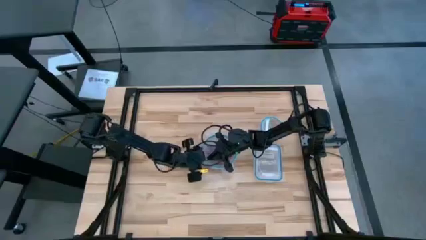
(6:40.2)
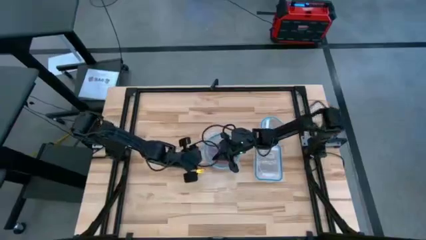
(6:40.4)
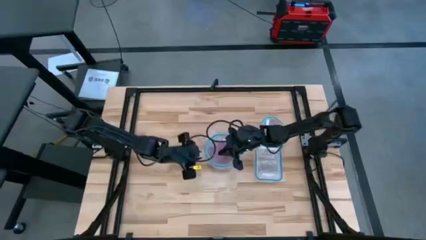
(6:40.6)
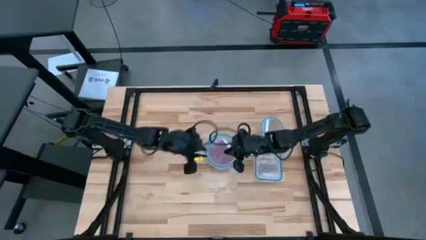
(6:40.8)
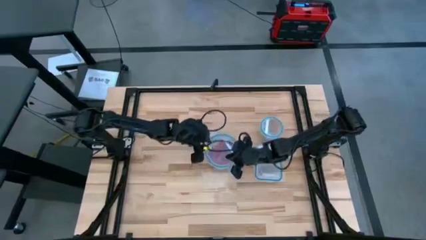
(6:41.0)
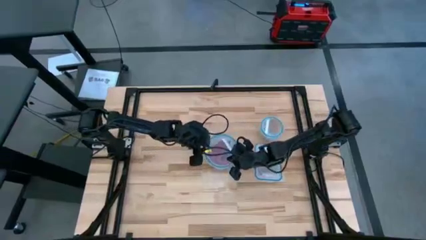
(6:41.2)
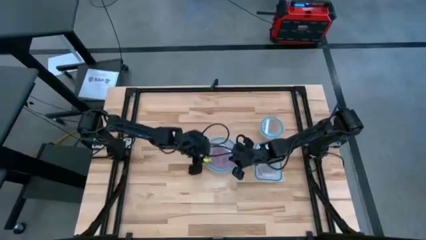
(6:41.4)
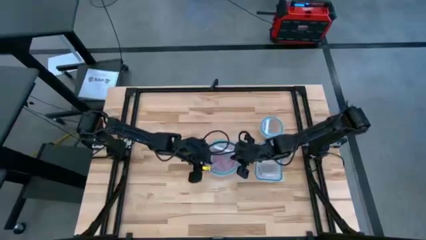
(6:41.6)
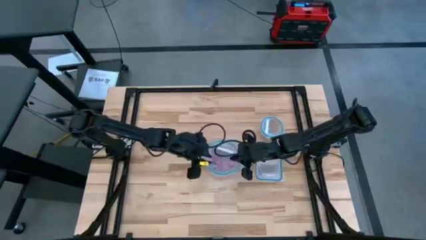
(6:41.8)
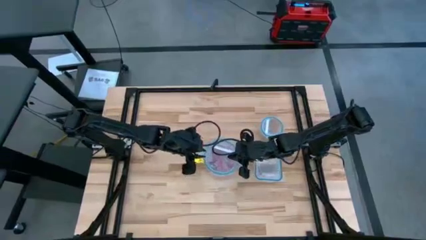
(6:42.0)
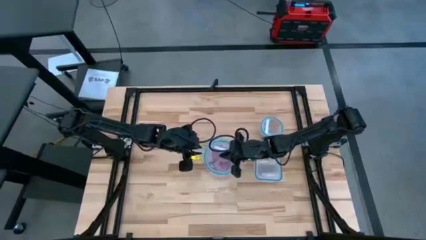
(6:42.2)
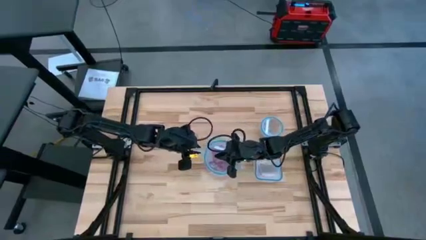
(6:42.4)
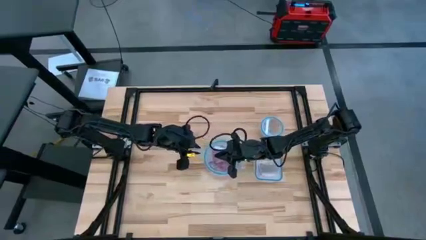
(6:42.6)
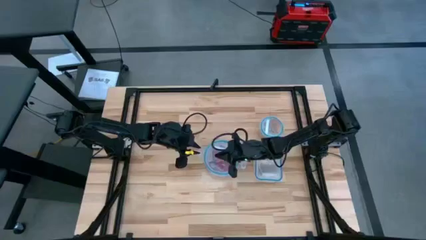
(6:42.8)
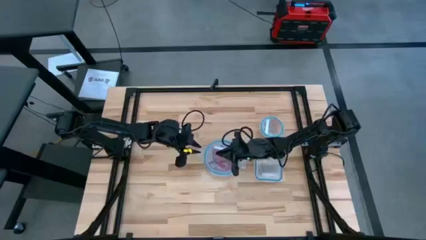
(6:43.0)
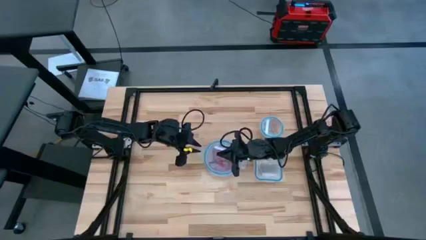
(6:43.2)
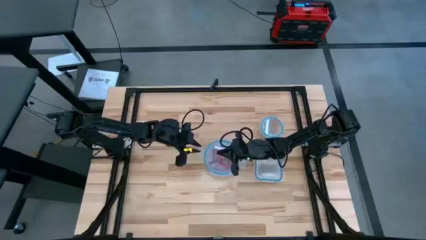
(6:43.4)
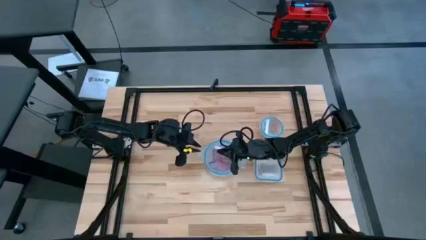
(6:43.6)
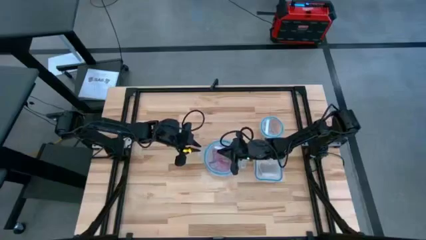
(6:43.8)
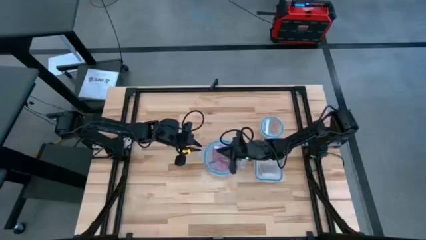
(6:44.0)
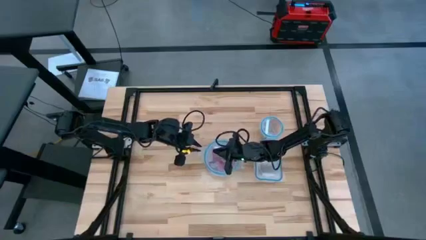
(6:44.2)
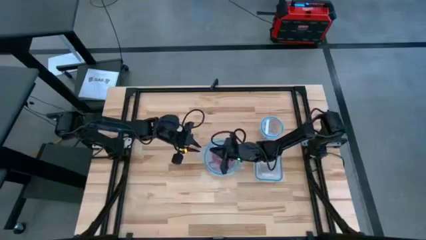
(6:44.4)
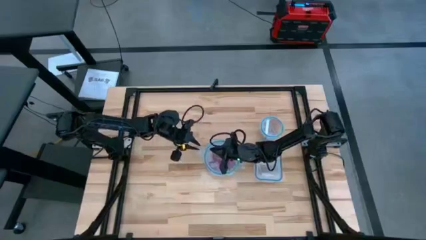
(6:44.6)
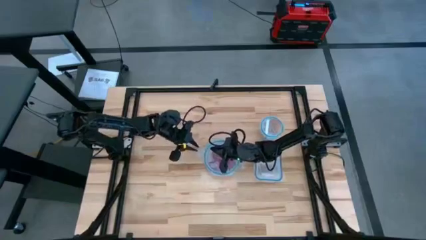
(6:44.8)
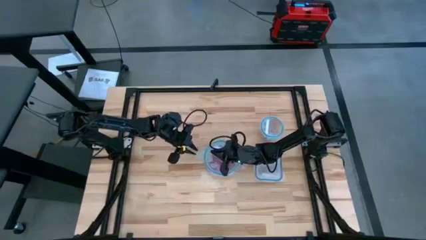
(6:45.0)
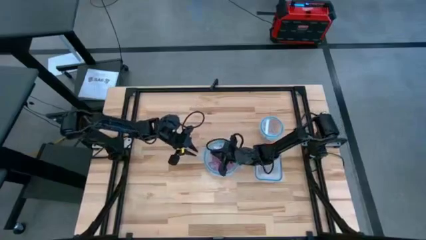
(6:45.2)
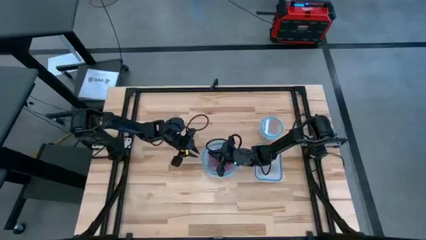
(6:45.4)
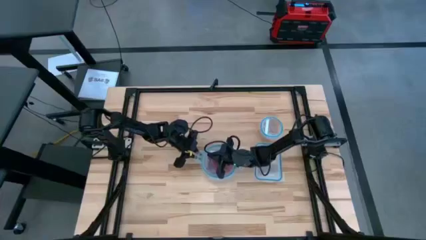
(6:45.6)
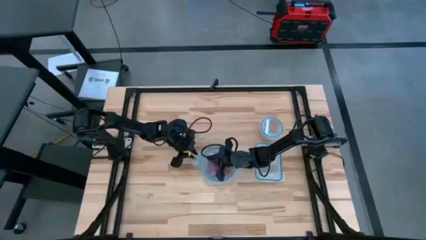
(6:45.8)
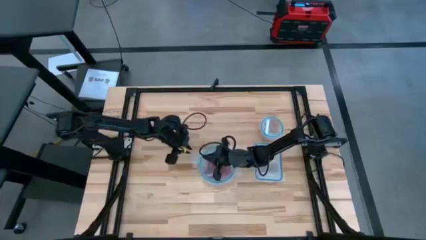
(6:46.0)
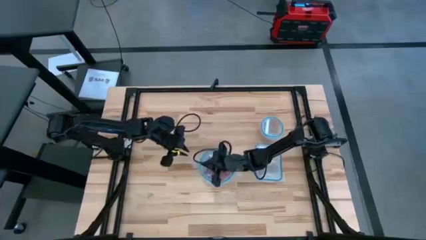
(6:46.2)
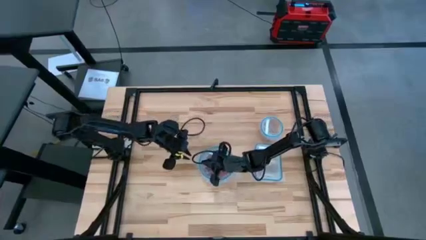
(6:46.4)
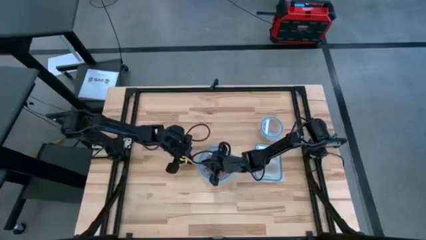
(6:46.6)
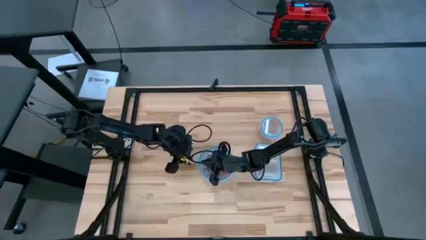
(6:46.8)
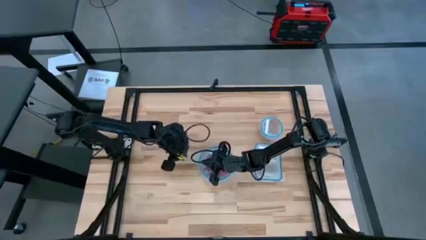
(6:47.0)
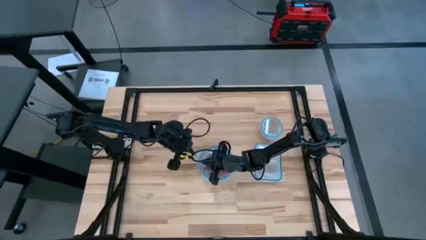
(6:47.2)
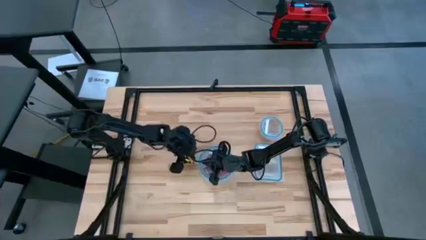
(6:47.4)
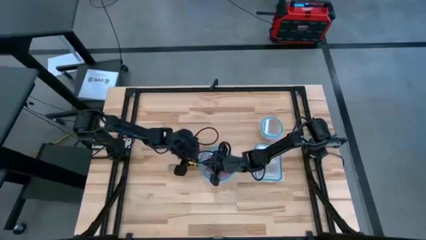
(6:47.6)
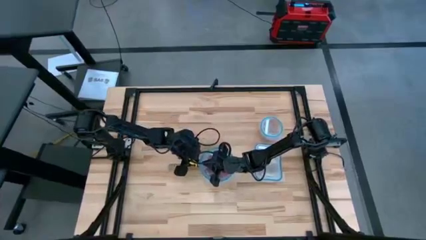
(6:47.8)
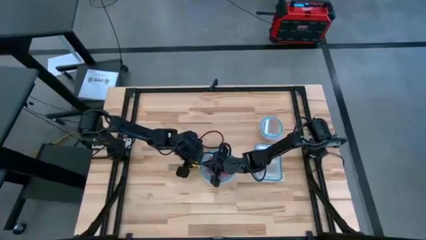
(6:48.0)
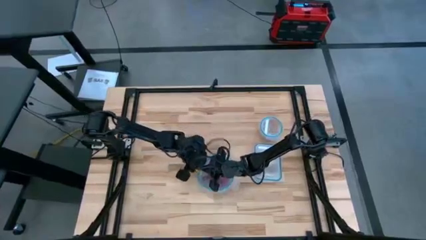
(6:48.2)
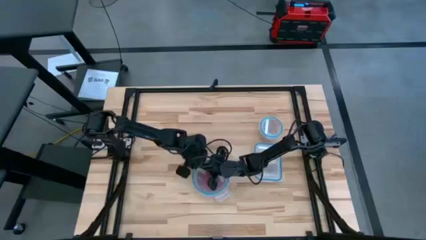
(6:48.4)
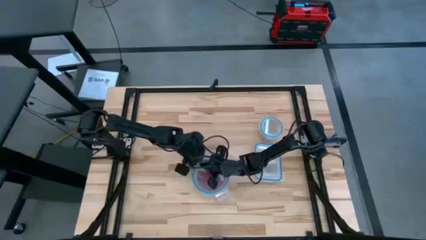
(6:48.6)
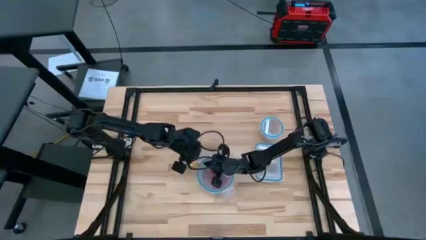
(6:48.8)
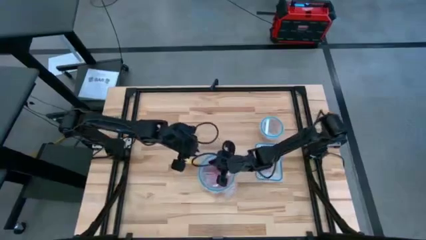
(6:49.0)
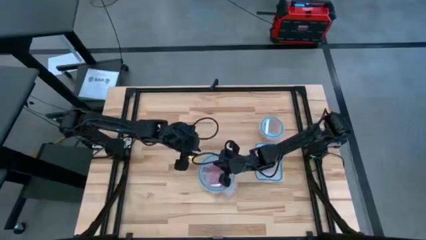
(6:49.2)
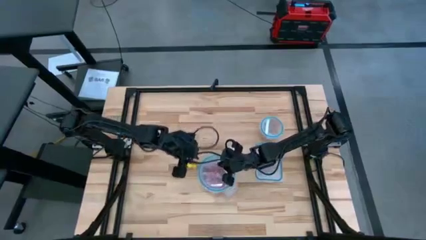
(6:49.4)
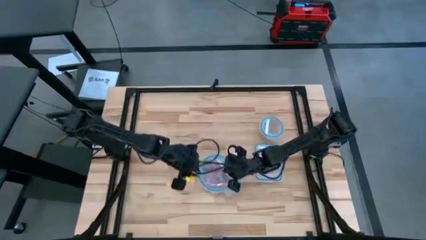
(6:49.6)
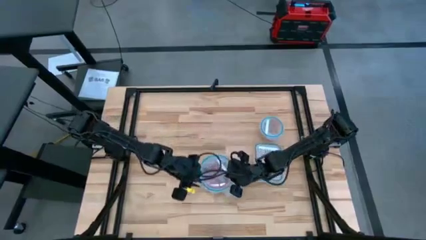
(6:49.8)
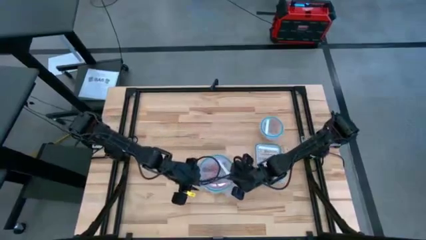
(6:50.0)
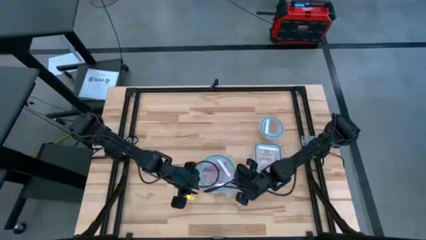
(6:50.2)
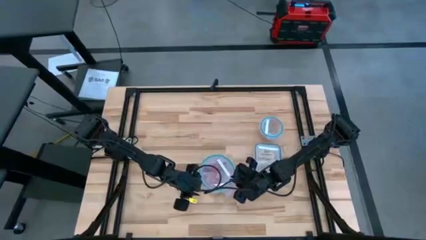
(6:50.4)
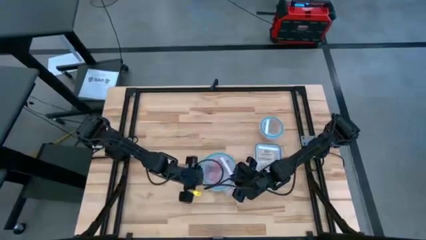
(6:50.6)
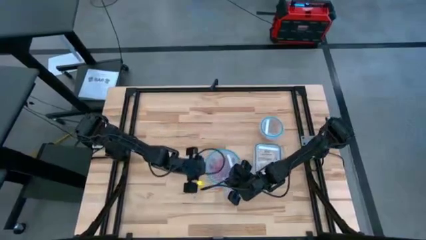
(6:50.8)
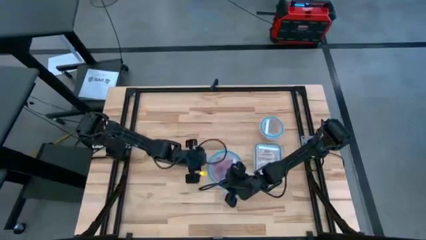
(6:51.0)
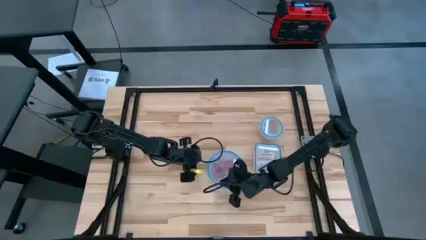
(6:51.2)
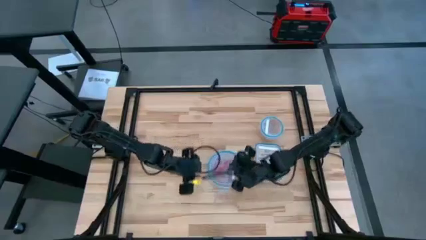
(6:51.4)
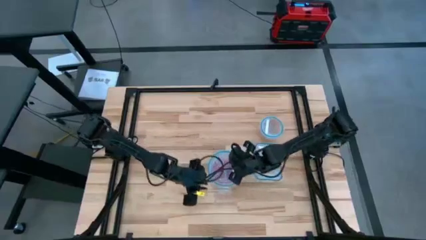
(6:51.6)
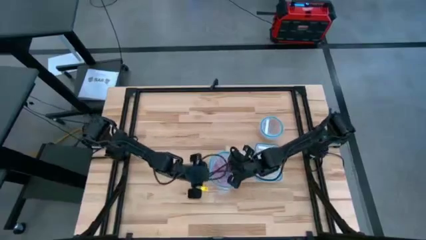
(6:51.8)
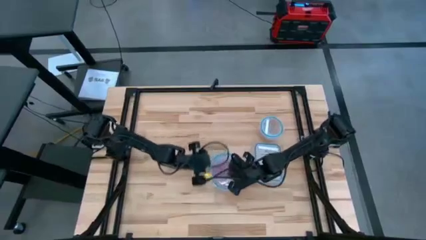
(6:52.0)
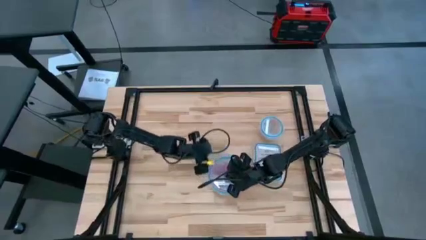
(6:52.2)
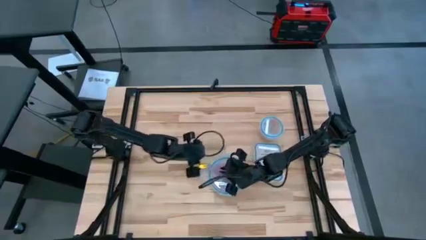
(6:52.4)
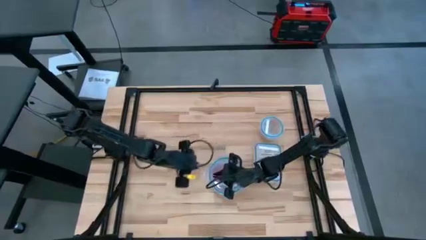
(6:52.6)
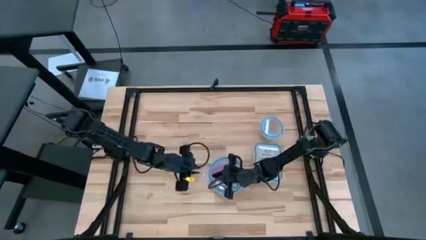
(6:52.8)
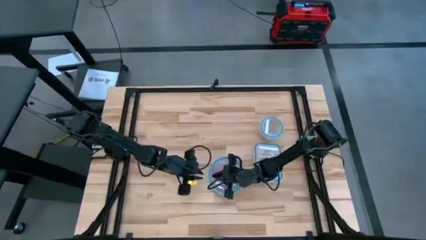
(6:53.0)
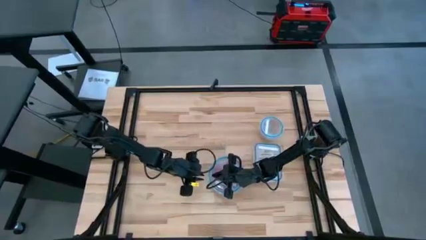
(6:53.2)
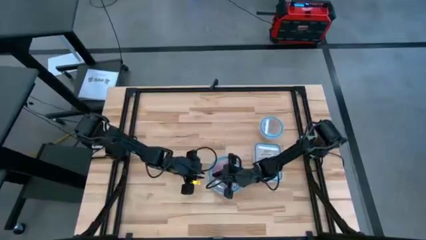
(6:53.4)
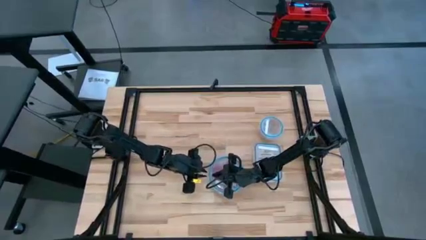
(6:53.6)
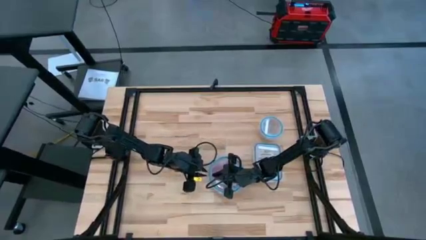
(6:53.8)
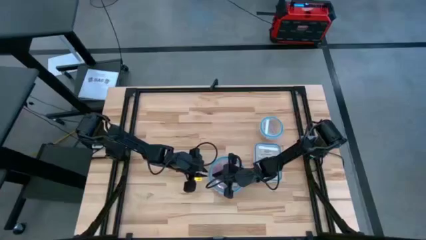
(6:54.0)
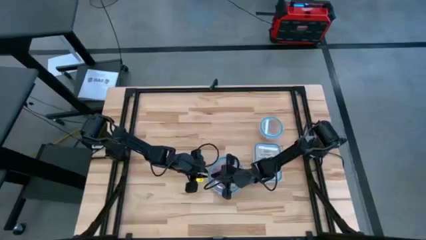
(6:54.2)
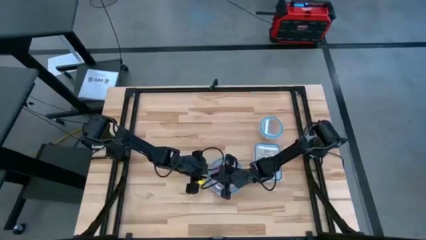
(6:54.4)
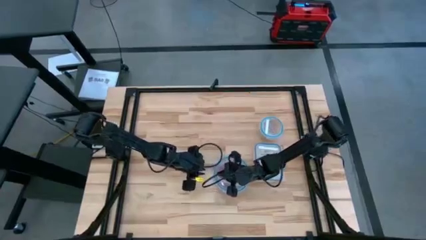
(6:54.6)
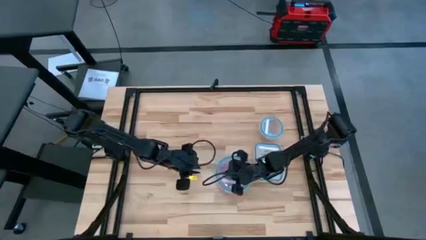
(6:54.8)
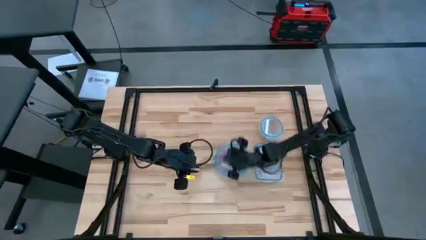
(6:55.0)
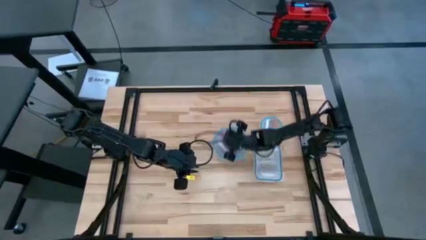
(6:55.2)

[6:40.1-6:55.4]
Task: Sort candy
Close the big circular transparent bin
